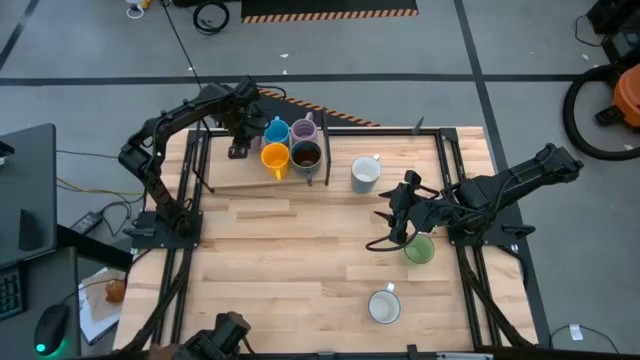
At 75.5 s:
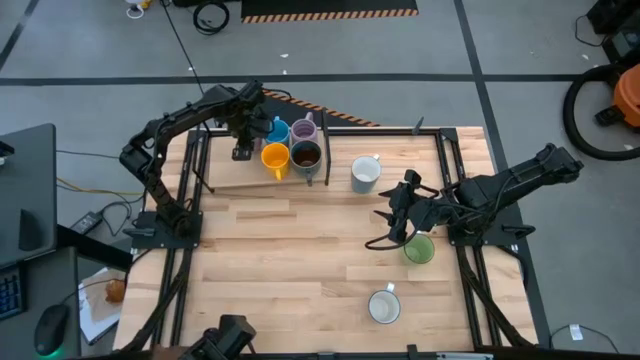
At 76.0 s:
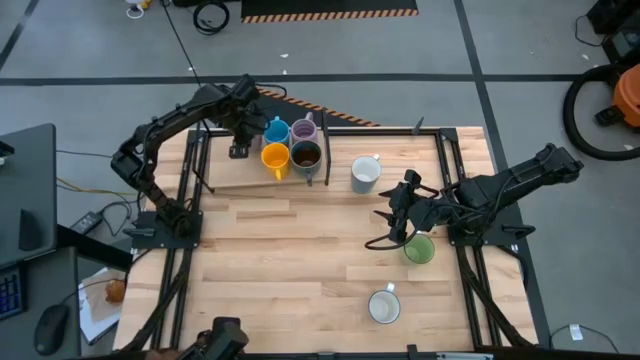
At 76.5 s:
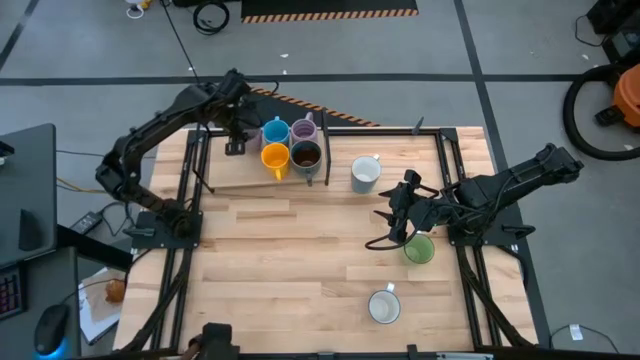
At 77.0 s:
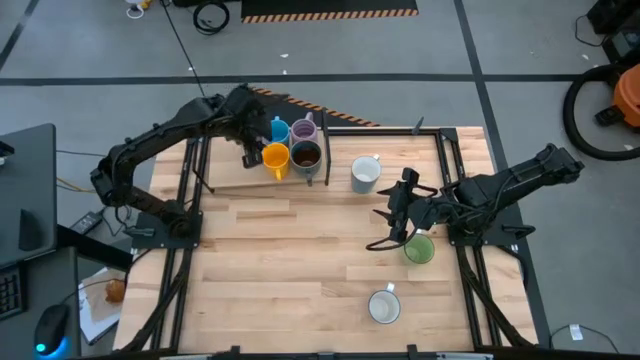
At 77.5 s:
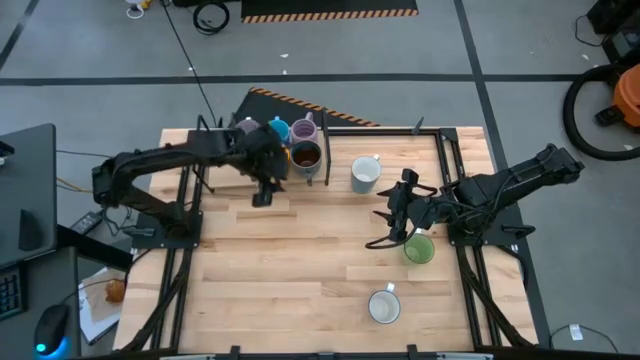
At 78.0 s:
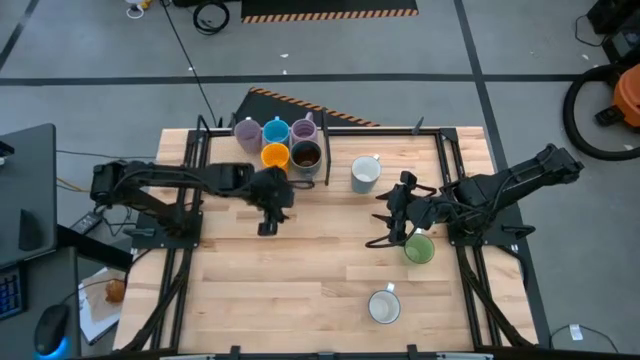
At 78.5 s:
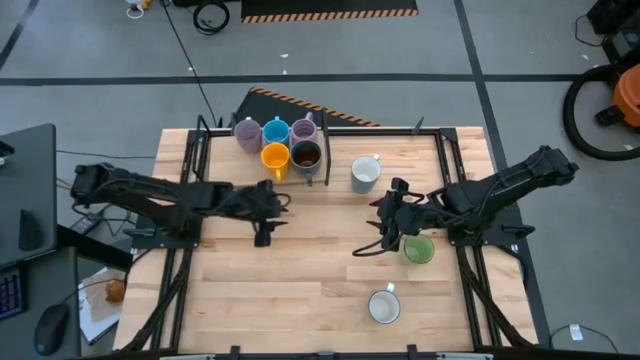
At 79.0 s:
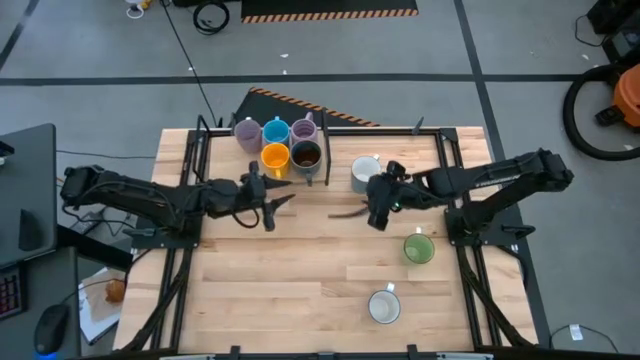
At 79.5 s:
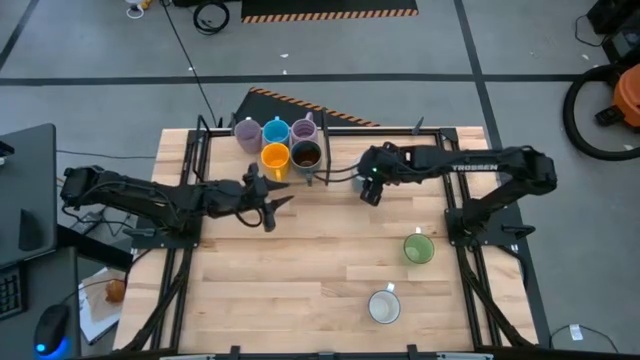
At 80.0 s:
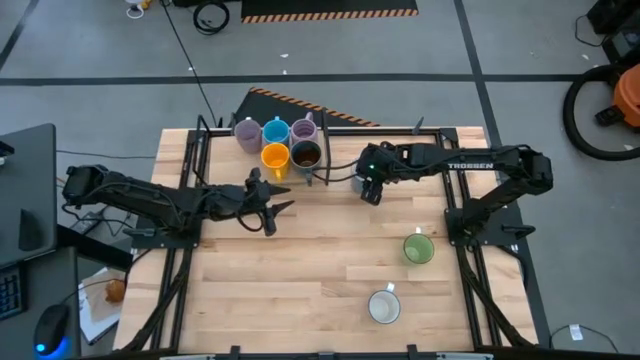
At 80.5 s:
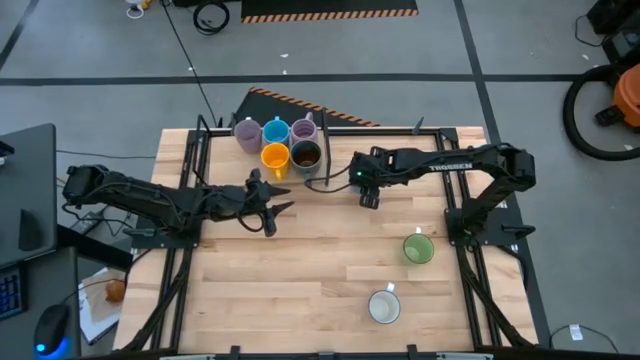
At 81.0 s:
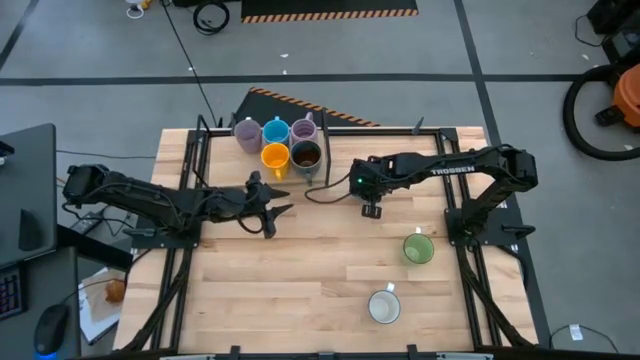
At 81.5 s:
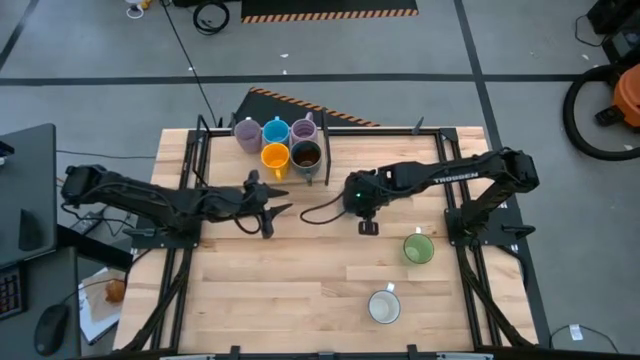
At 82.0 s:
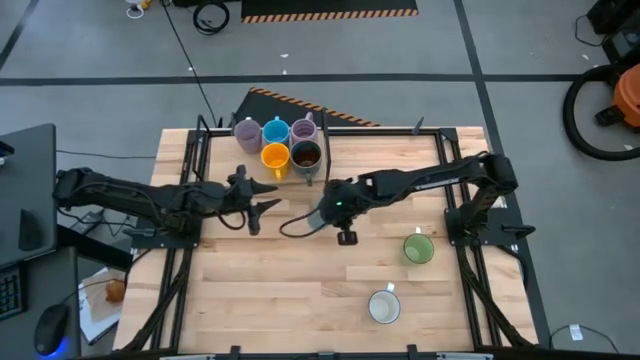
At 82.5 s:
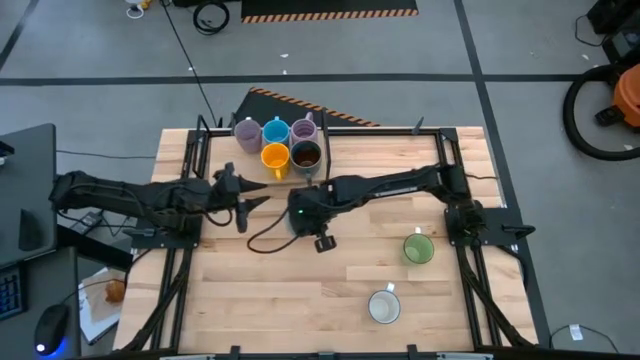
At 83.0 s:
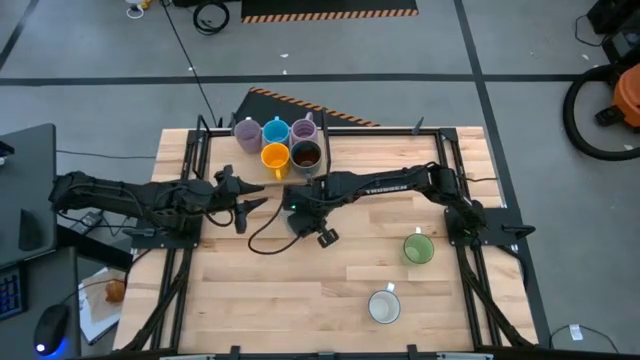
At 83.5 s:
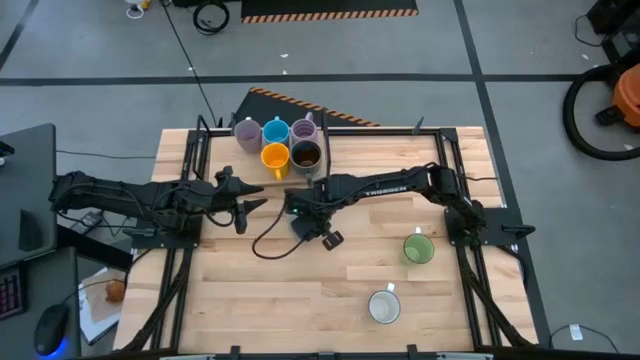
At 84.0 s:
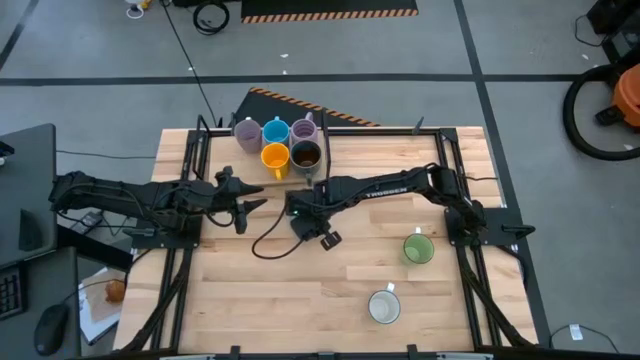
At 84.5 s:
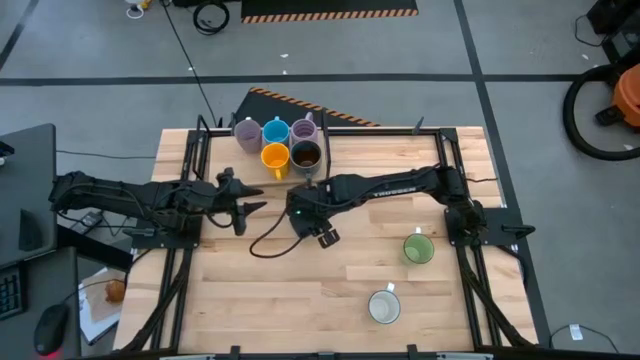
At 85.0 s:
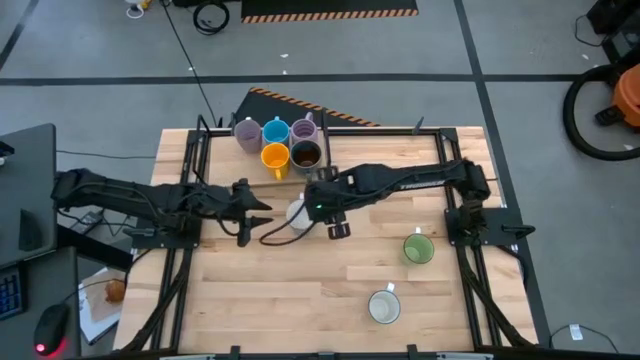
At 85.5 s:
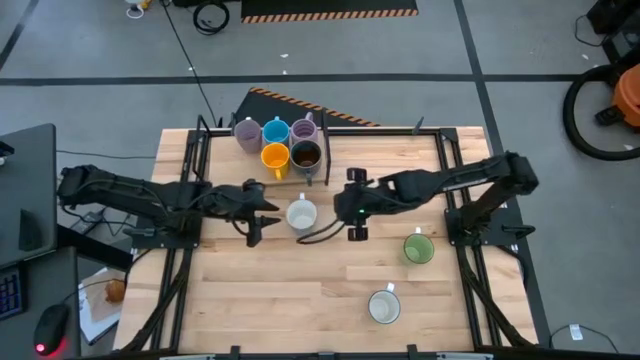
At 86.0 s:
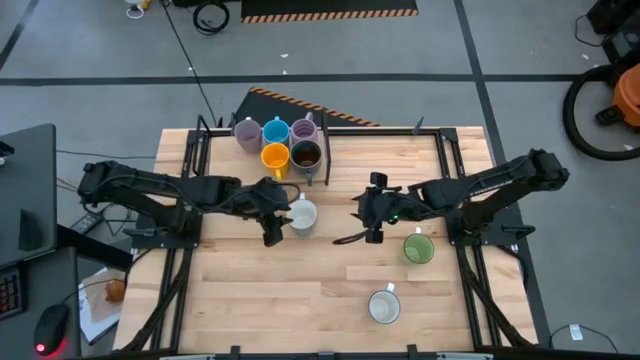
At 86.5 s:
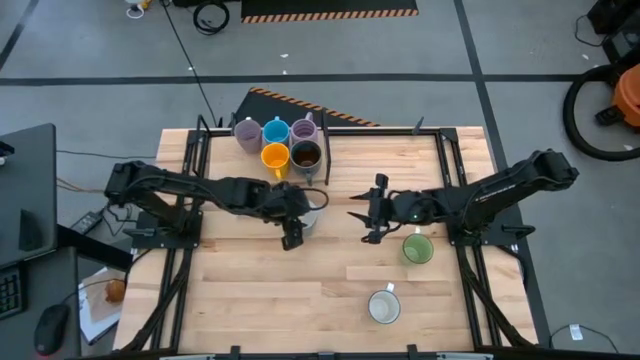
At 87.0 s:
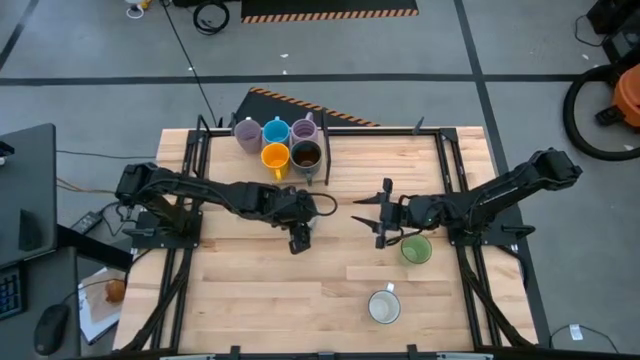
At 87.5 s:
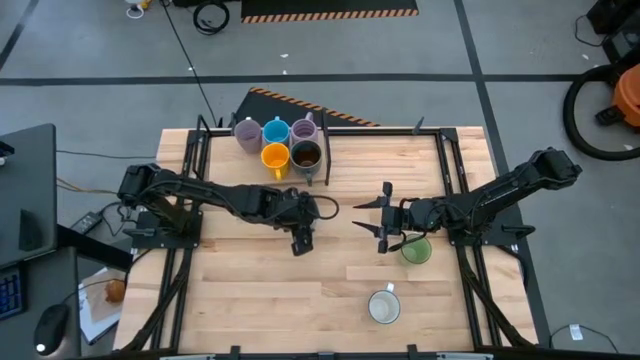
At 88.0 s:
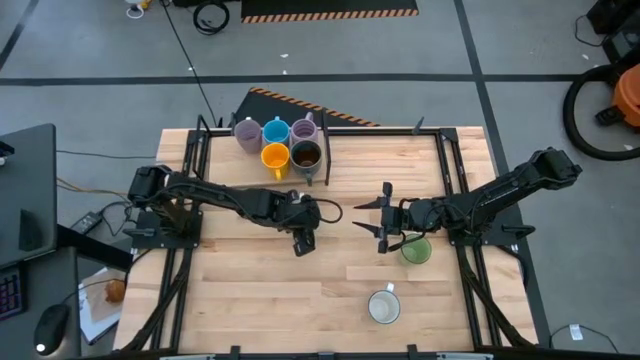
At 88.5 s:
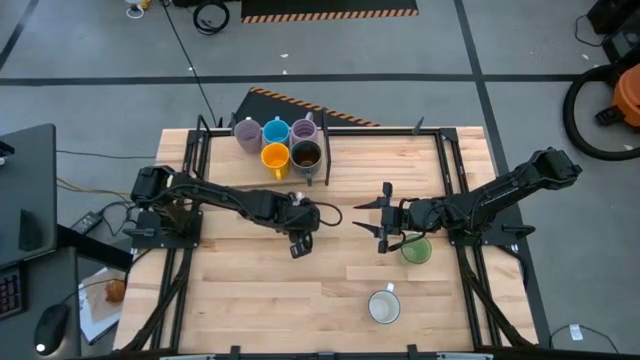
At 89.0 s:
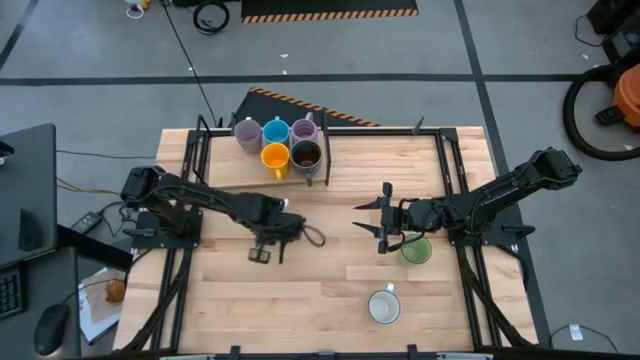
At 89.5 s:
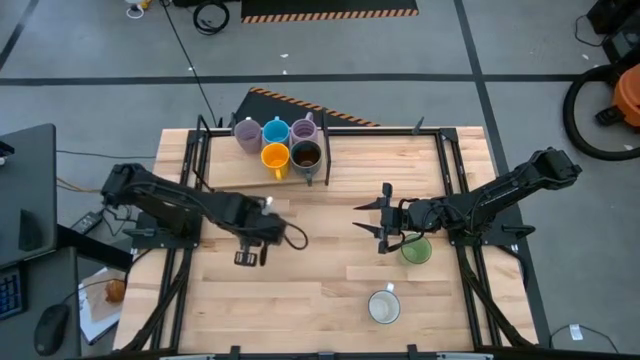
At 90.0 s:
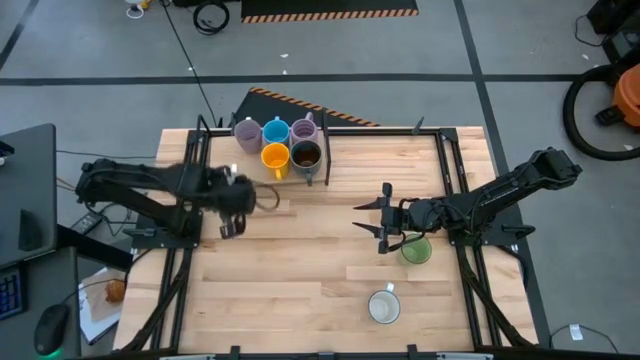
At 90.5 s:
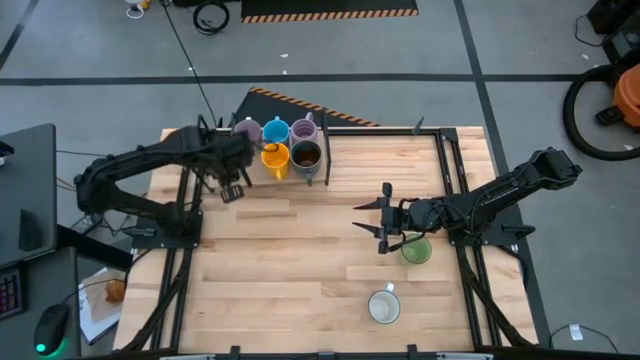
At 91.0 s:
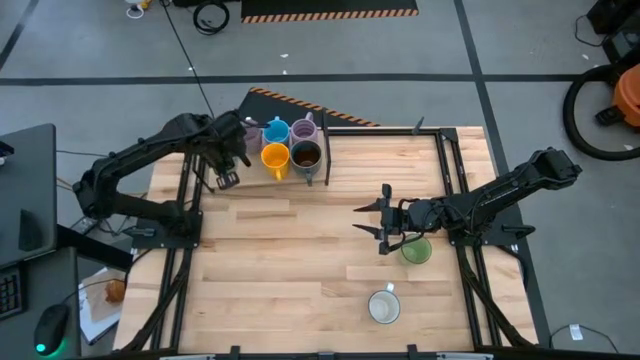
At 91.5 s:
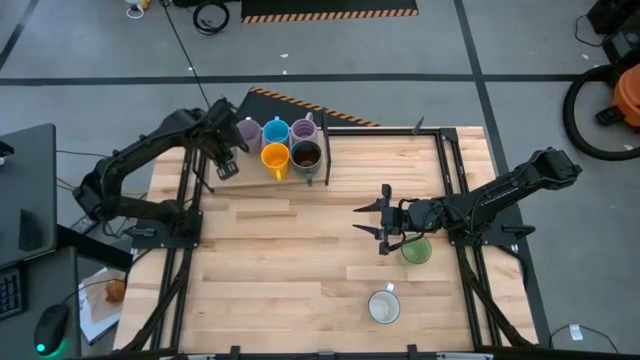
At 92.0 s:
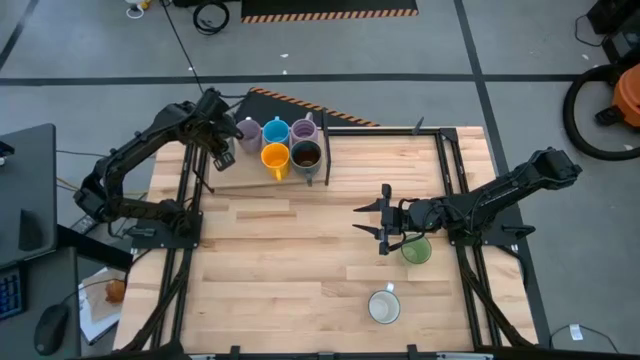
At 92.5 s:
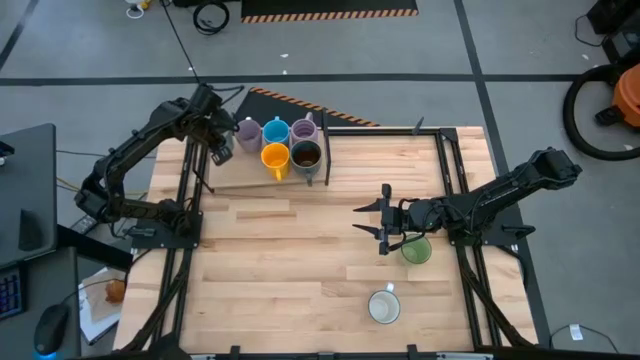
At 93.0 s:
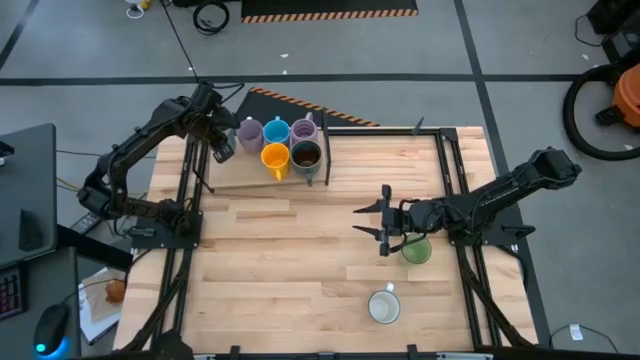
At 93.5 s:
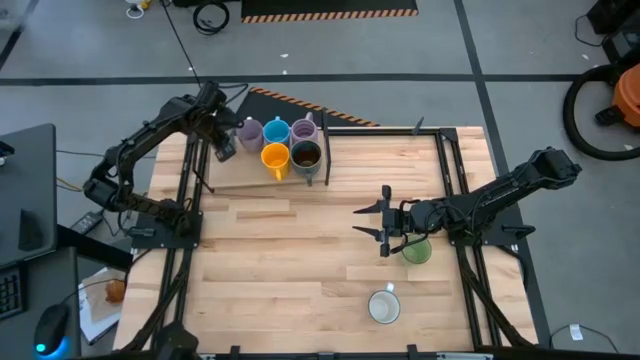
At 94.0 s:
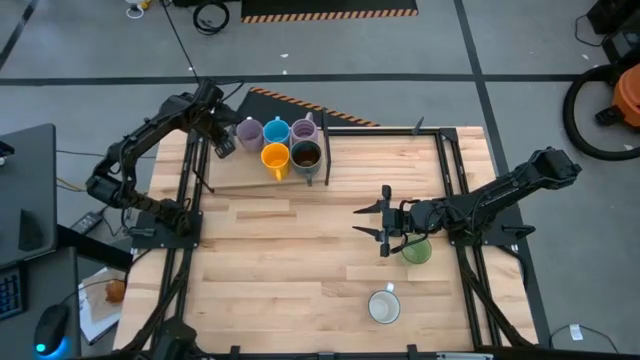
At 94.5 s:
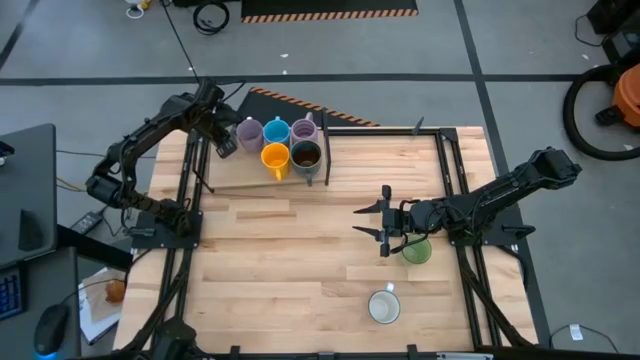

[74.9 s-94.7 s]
Task: Place coffee mugs
Put the blue and white mug on the shelf
